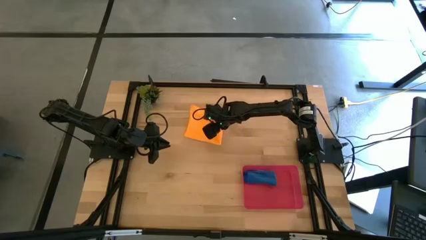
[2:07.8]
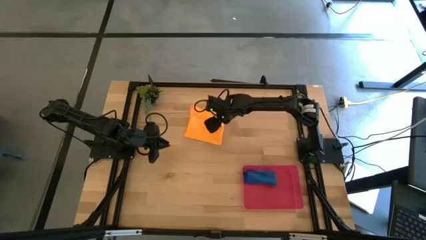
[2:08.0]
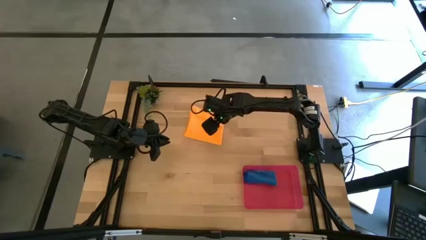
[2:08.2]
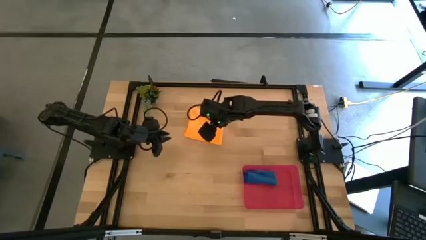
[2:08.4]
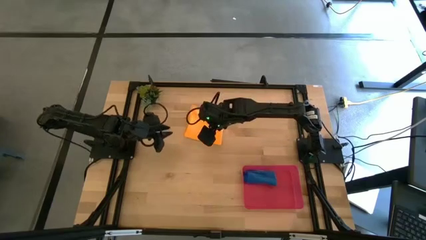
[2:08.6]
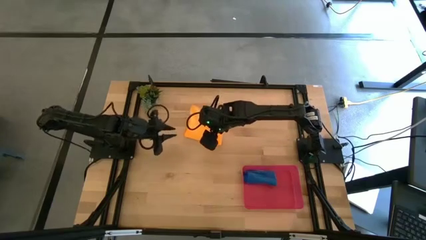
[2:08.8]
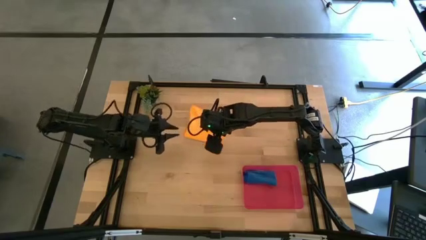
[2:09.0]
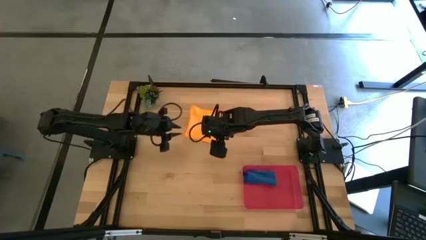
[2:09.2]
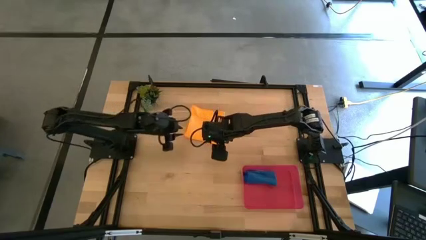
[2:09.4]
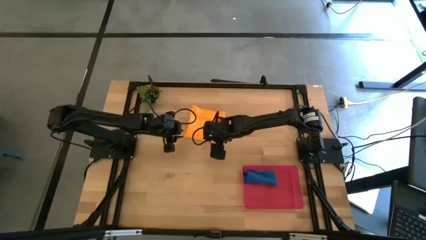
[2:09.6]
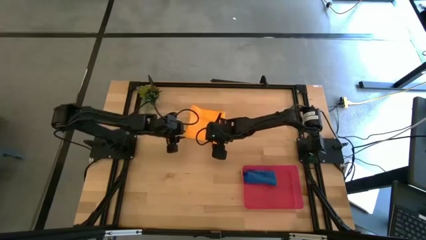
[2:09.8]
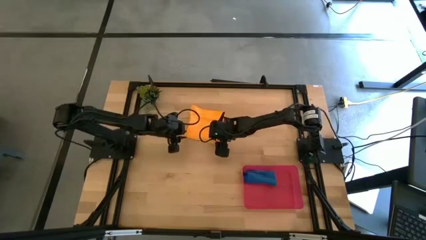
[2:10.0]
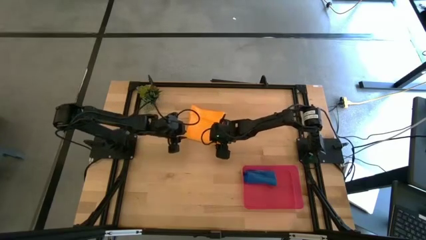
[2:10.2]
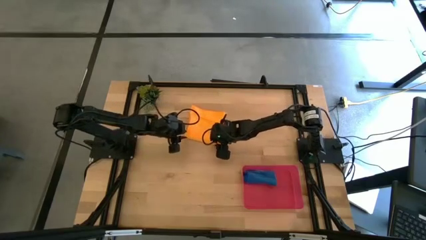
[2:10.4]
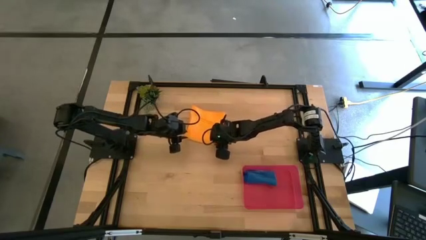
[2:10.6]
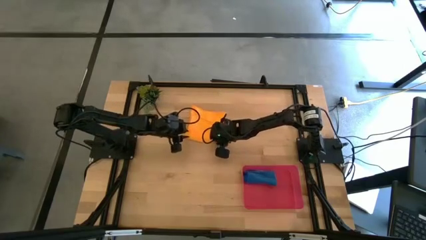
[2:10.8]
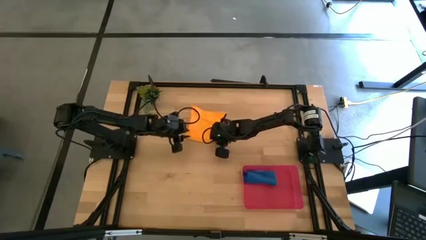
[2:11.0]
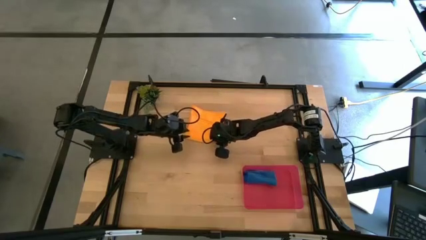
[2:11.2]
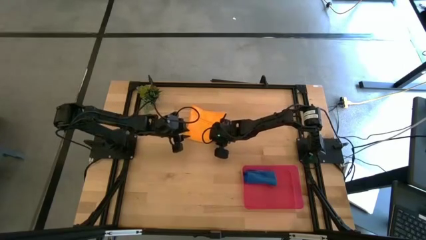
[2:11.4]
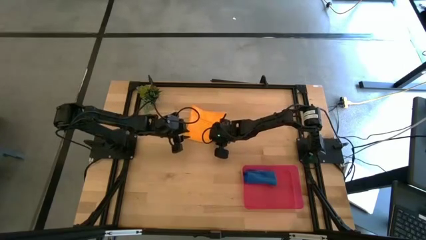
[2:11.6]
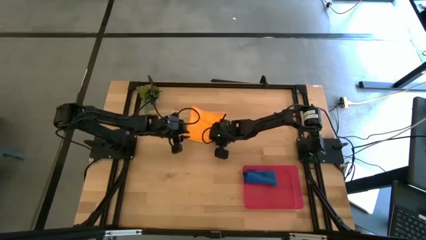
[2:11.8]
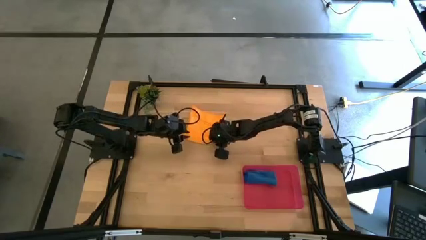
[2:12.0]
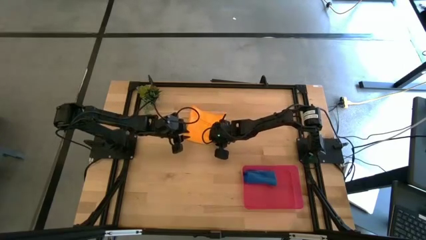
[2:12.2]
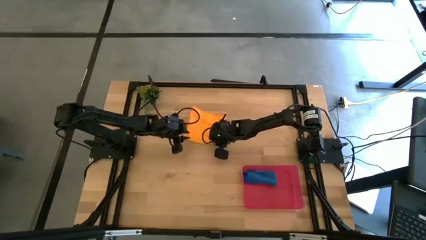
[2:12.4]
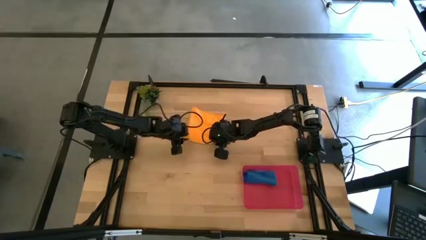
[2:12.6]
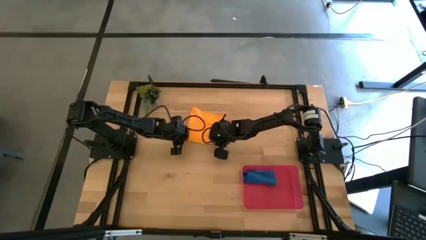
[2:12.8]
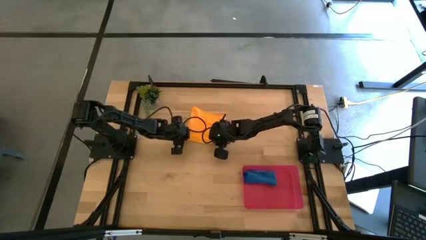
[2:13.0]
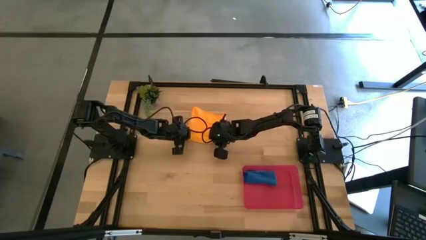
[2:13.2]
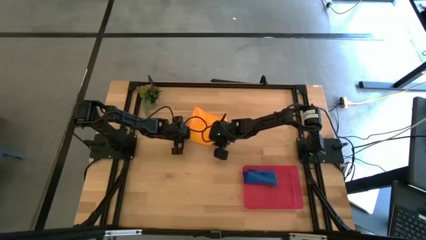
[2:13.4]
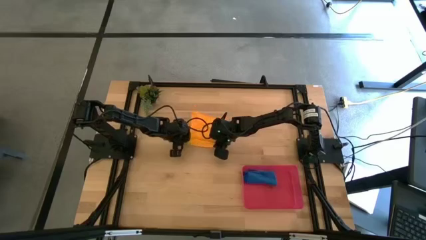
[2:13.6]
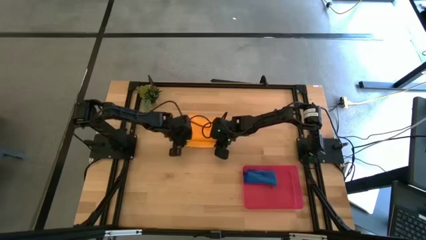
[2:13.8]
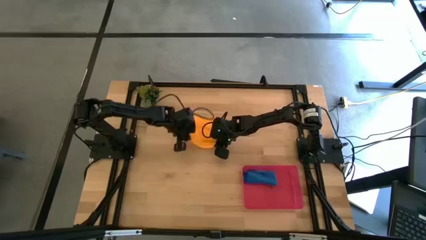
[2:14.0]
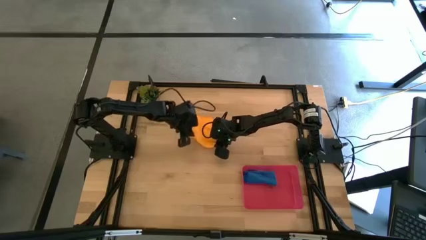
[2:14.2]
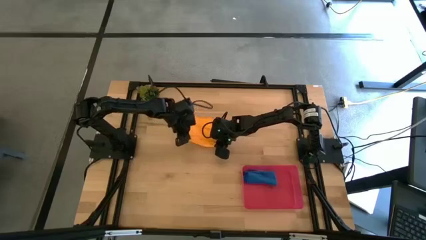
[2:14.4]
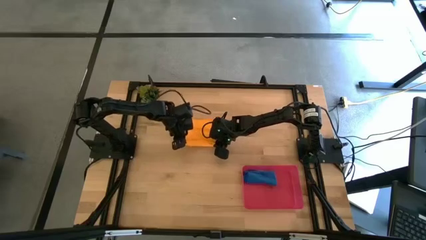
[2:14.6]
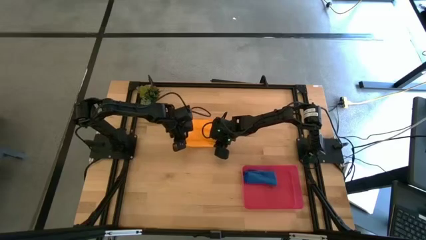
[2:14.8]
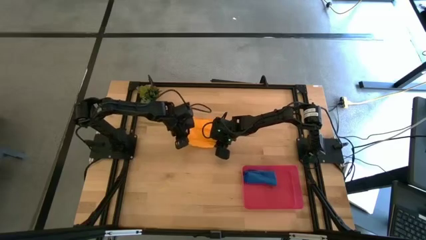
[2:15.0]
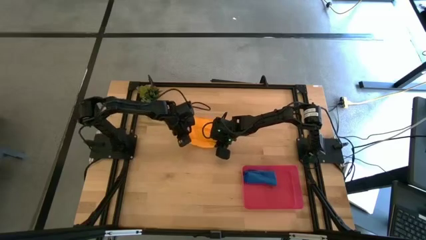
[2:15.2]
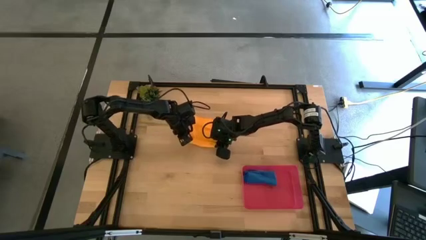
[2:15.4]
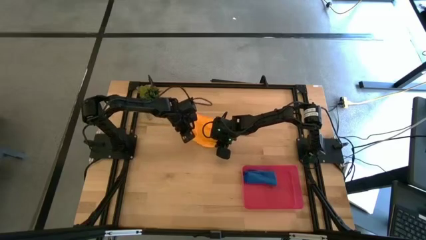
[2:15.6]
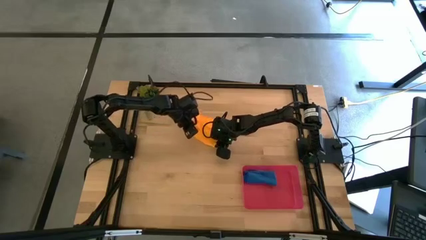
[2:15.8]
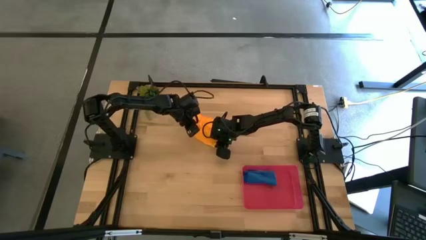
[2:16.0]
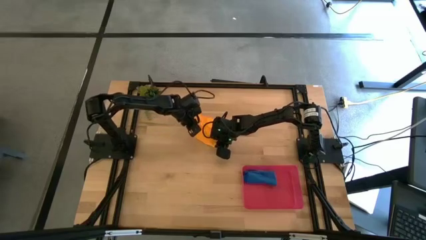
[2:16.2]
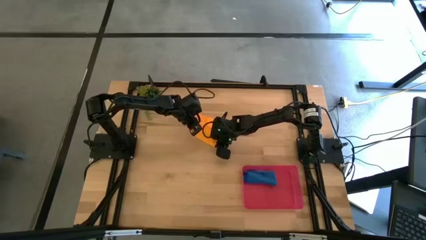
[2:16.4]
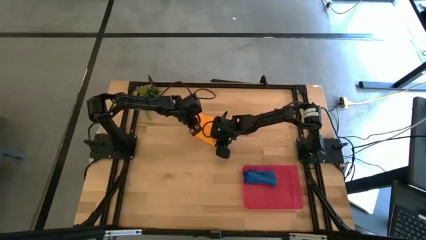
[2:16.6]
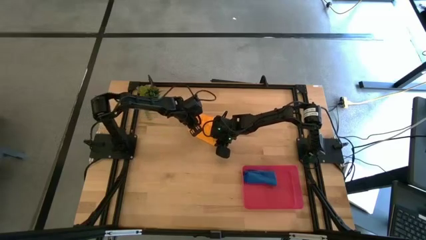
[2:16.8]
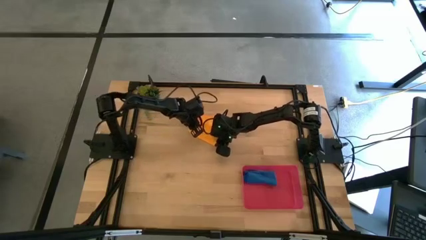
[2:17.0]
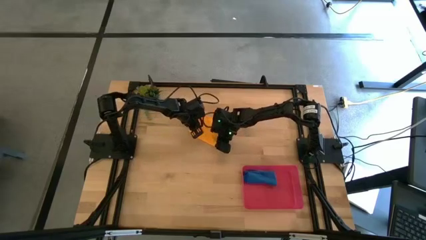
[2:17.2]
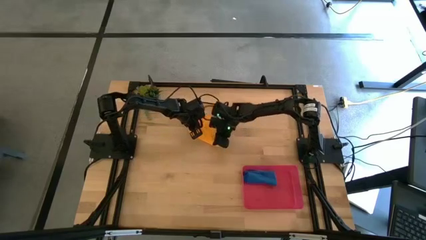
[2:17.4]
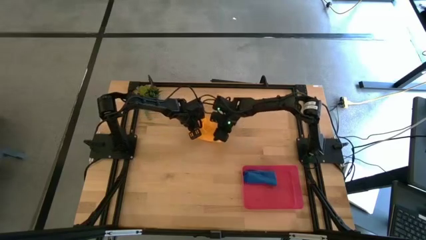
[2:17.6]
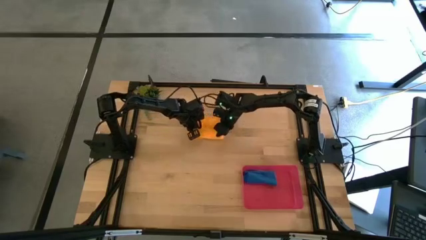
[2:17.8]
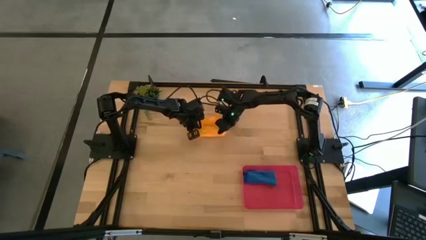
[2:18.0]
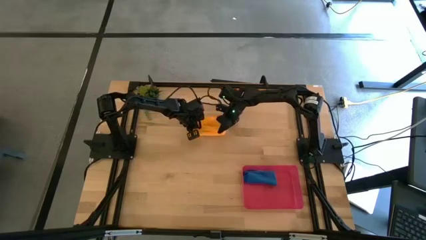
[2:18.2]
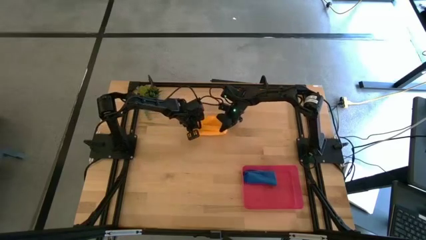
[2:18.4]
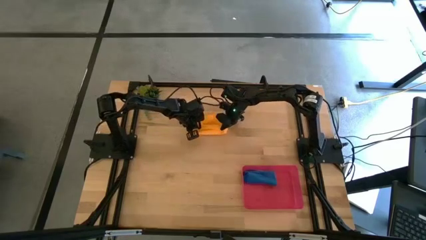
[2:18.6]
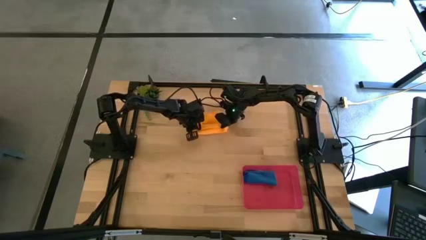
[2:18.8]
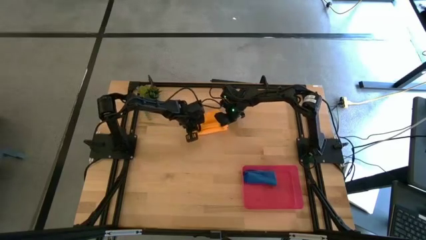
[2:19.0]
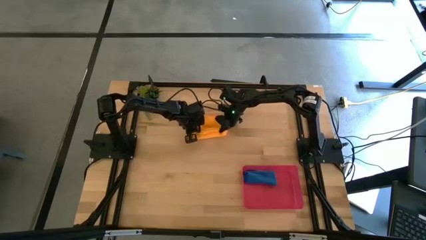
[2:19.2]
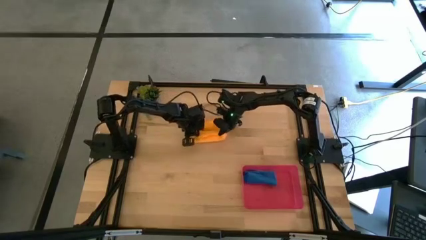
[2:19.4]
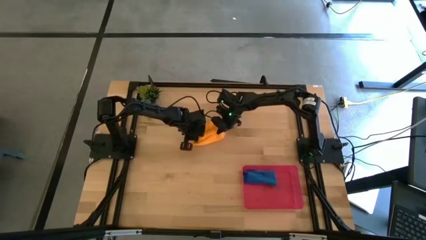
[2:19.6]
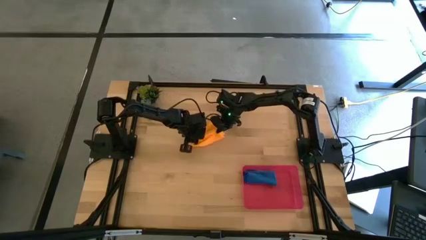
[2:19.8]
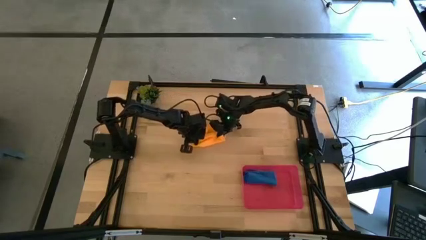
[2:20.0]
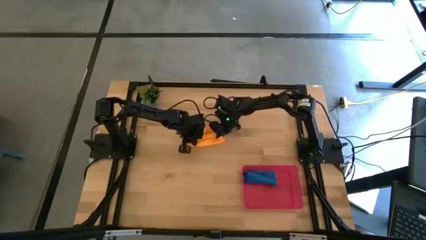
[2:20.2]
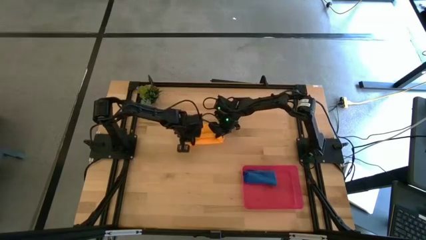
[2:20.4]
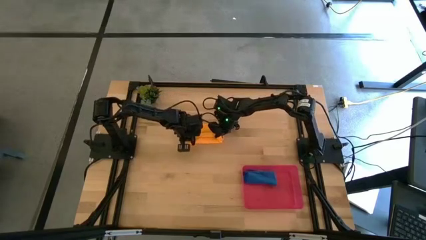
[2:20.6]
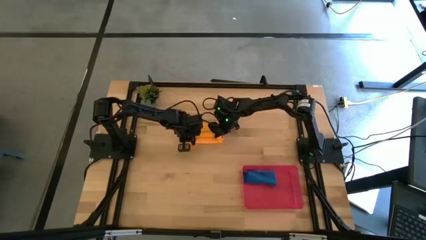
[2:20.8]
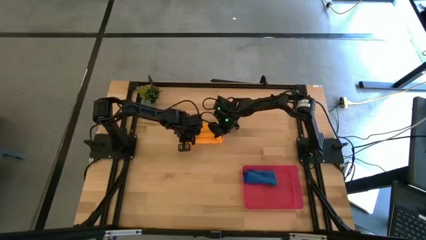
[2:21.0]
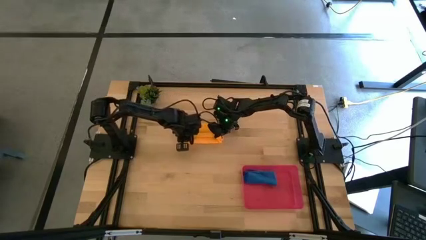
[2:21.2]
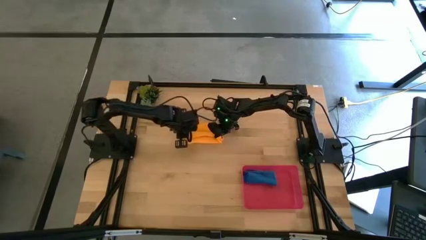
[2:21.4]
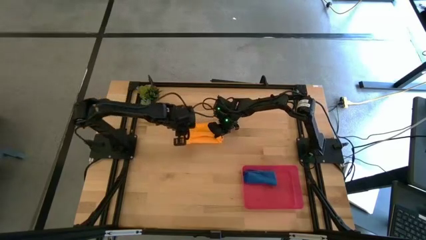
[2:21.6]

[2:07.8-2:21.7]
Task: Roll microfiber towels into tight, uniform cylinder then place into a basket
Roll the orange microfiber towel

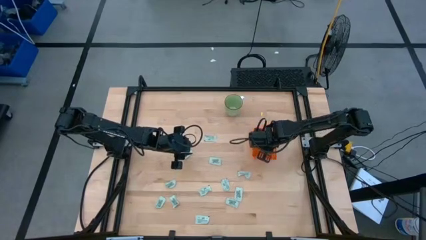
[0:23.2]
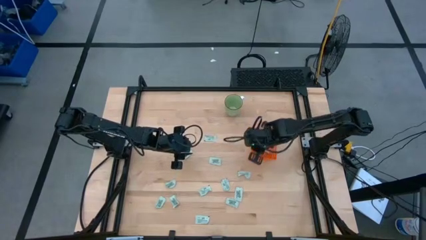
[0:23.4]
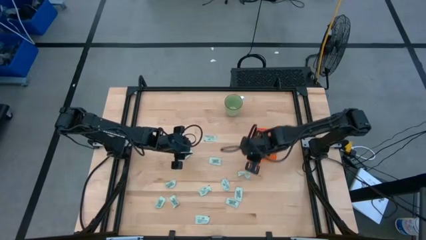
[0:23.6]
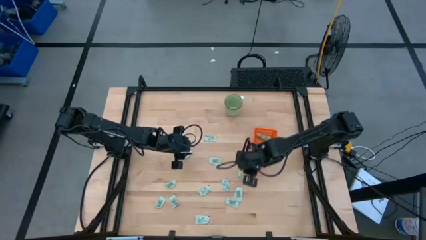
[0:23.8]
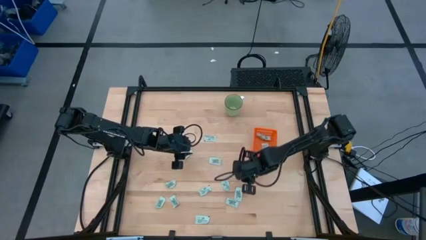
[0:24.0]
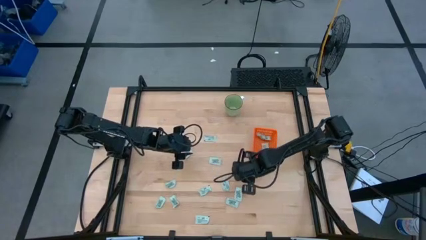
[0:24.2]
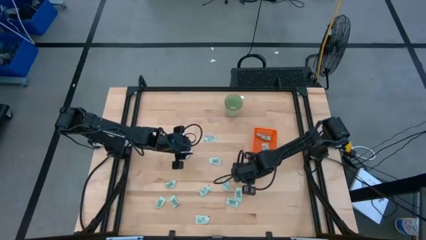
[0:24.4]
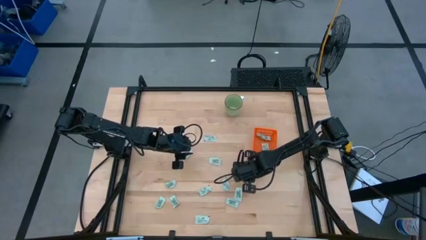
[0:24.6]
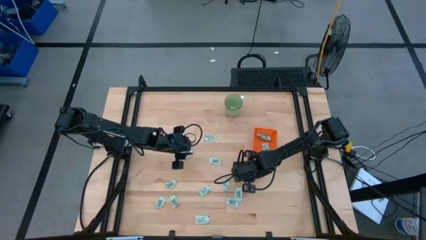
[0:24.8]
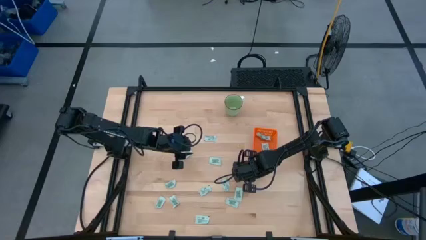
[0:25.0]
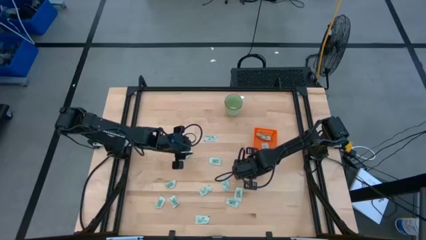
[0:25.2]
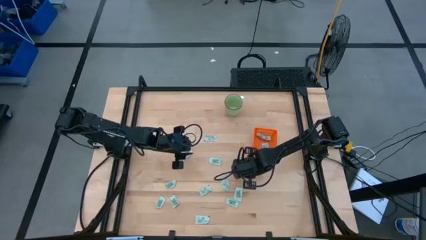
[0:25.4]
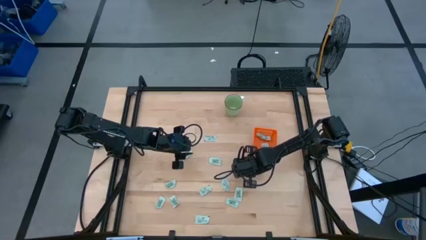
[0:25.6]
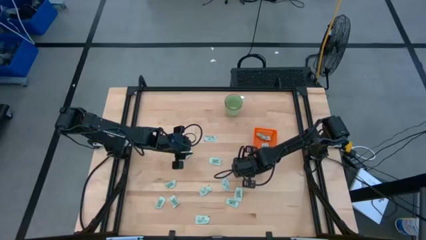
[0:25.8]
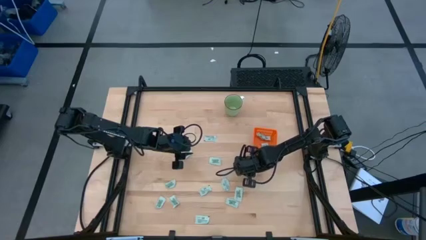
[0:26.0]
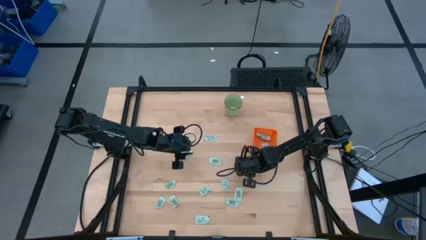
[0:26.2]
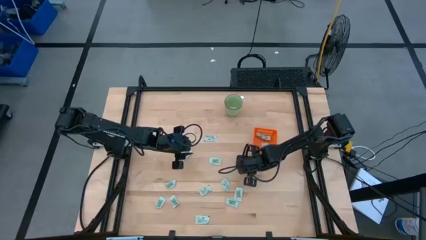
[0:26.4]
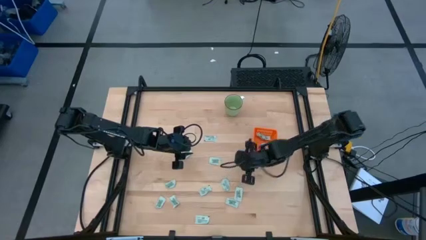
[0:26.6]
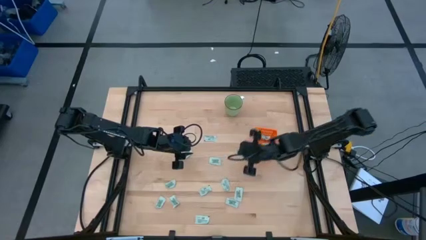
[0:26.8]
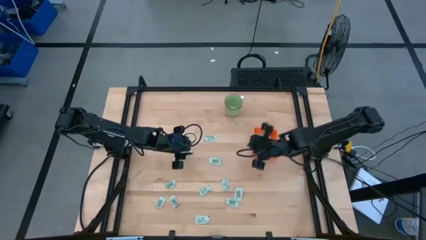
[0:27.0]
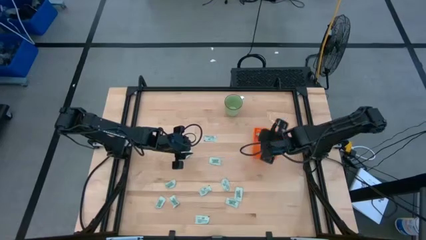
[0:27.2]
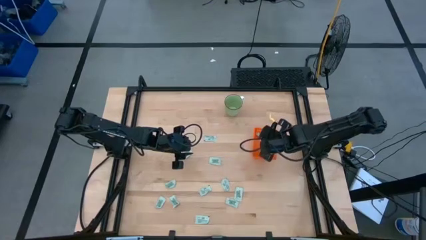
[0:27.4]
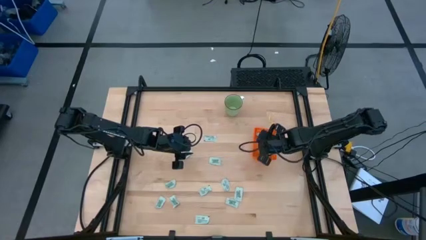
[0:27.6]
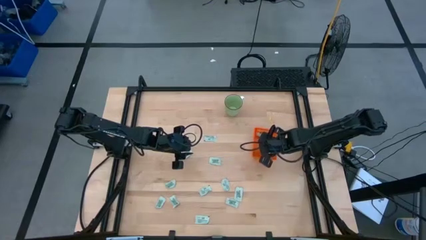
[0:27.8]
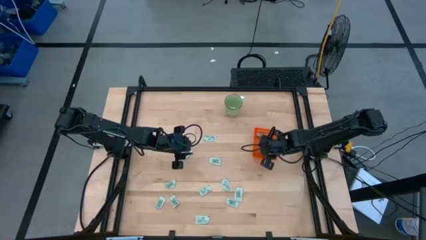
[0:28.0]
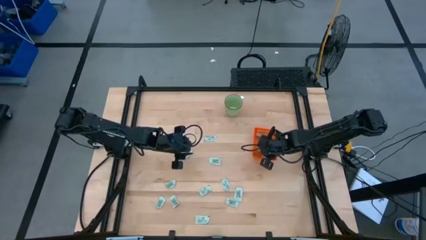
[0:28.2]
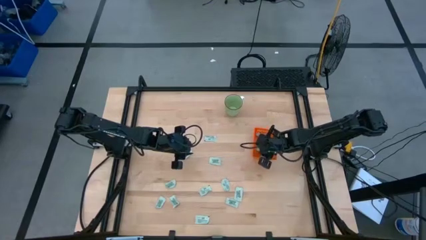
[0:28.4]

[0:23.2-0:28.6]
Task: Pick and place Stevia / Truvia into bins
Put the light green packet into the orange basket
